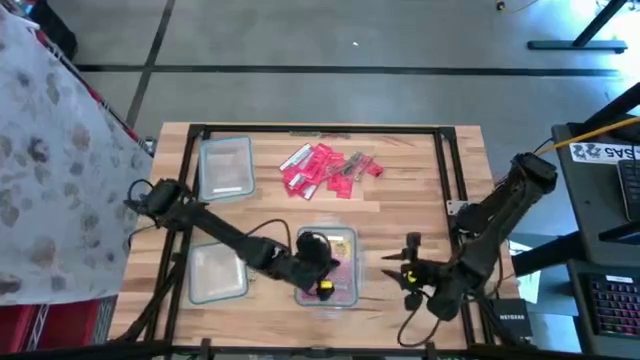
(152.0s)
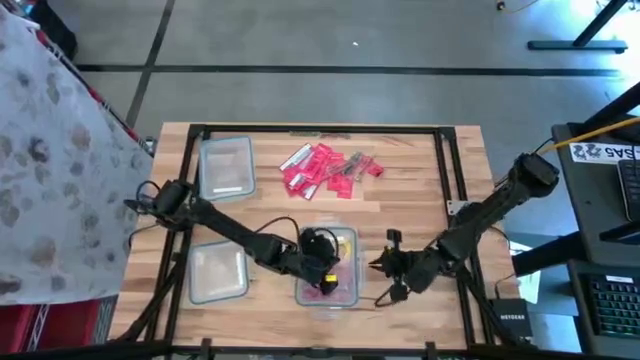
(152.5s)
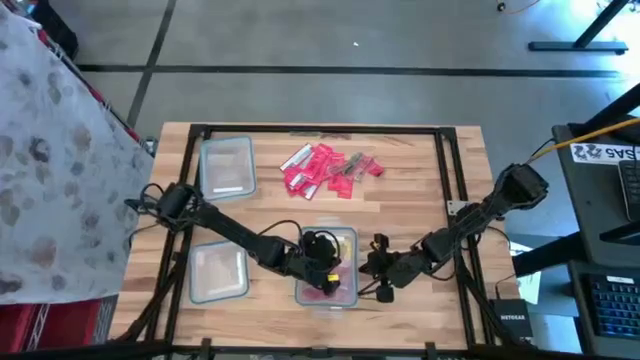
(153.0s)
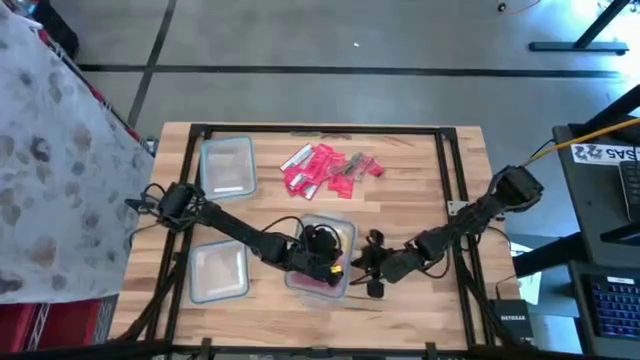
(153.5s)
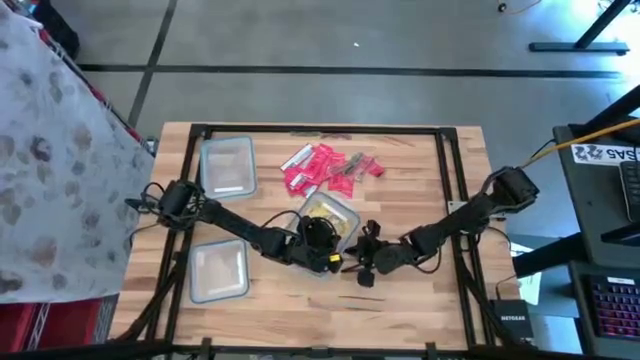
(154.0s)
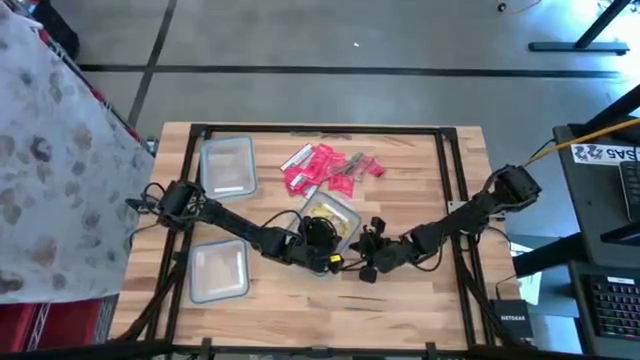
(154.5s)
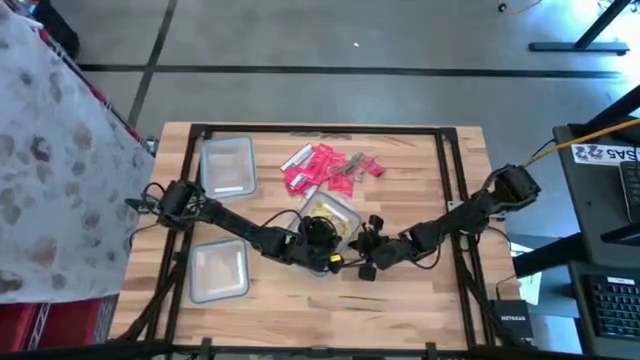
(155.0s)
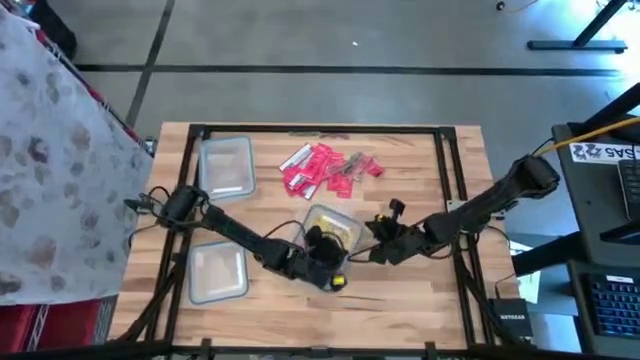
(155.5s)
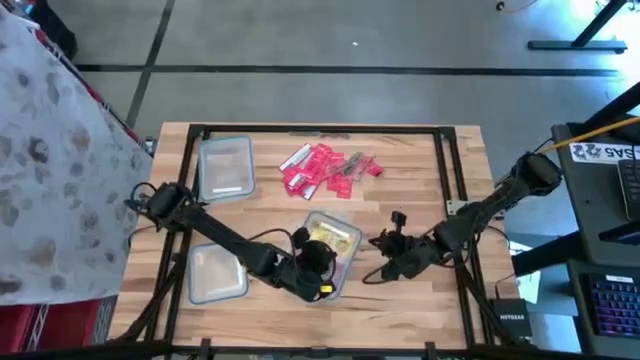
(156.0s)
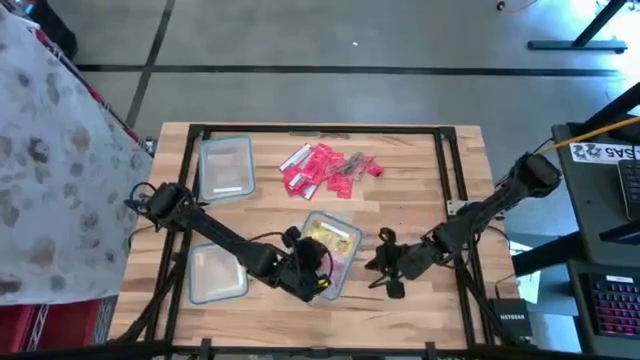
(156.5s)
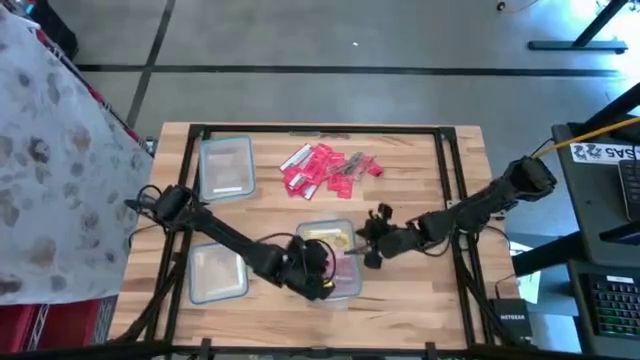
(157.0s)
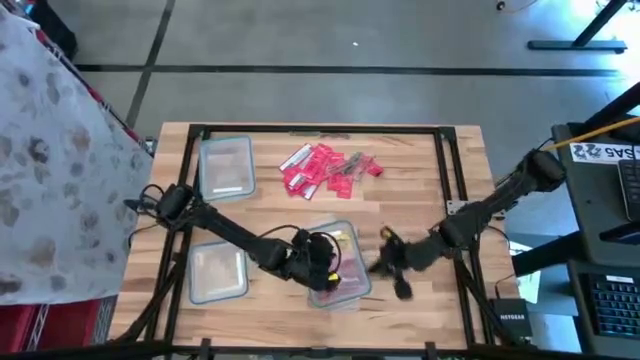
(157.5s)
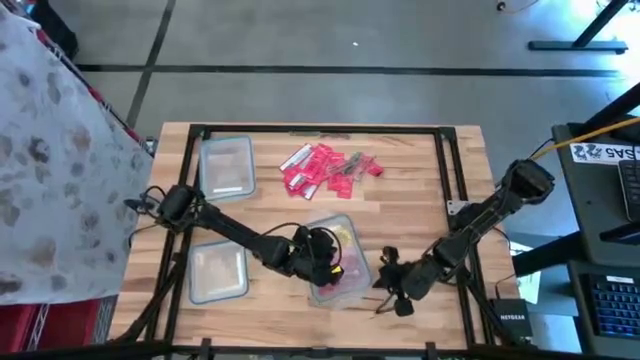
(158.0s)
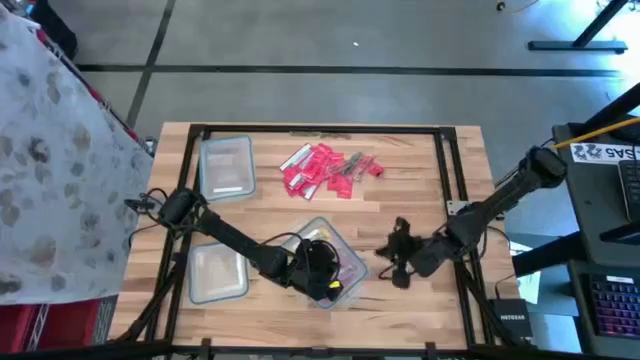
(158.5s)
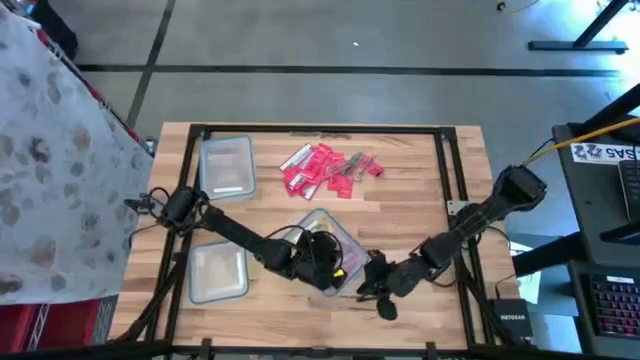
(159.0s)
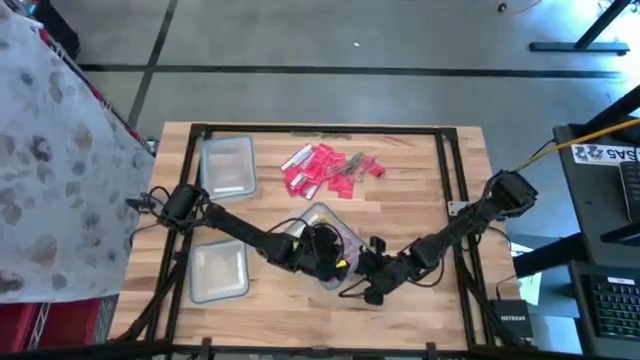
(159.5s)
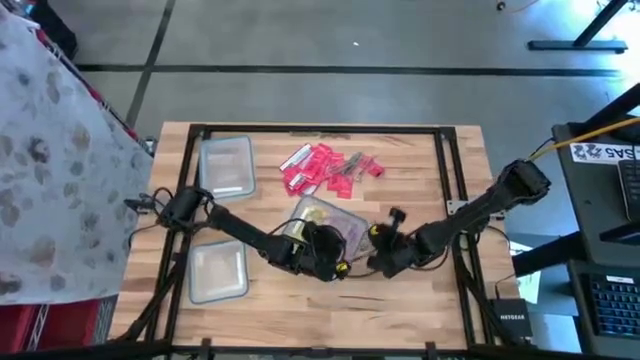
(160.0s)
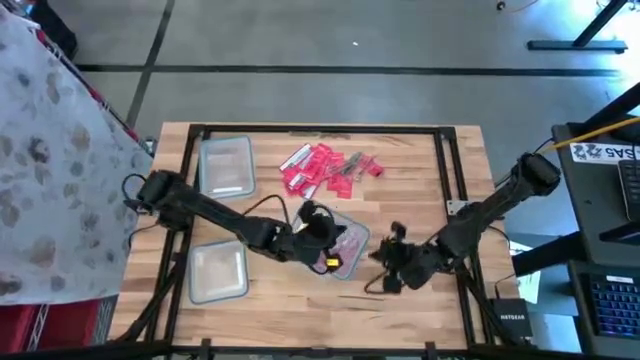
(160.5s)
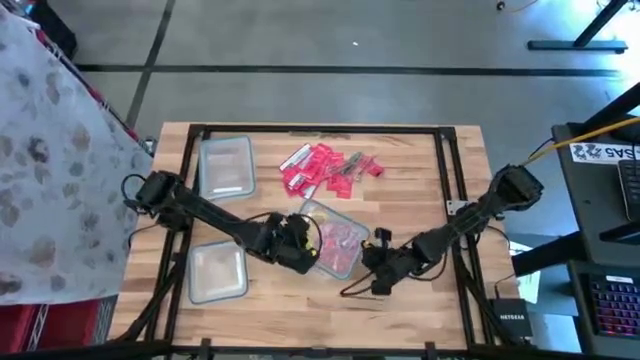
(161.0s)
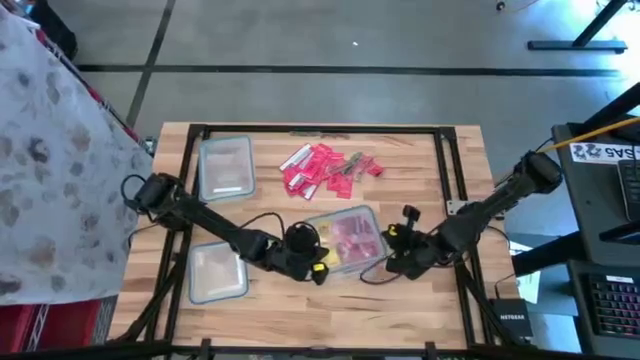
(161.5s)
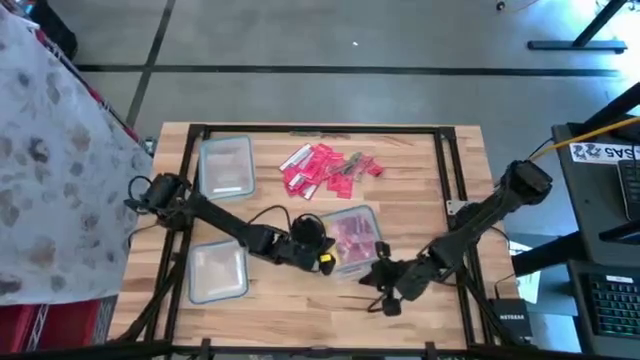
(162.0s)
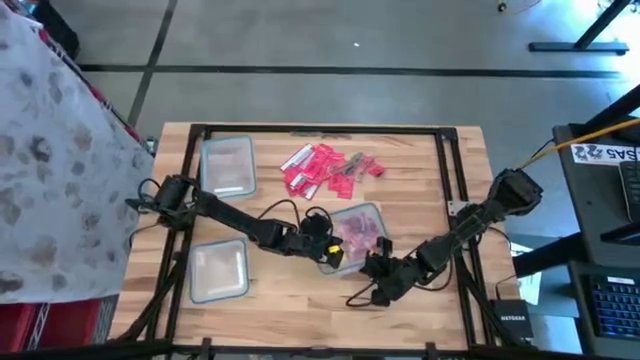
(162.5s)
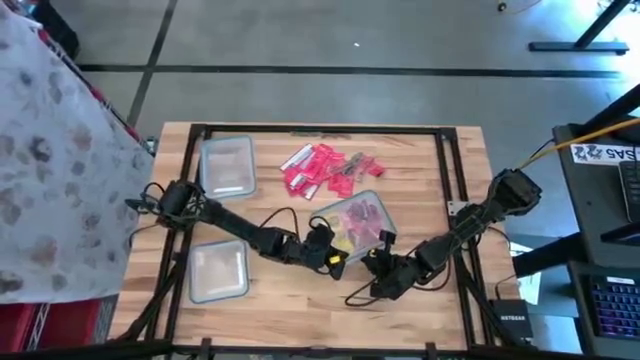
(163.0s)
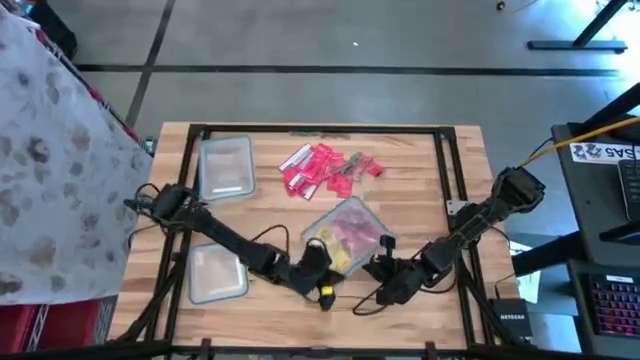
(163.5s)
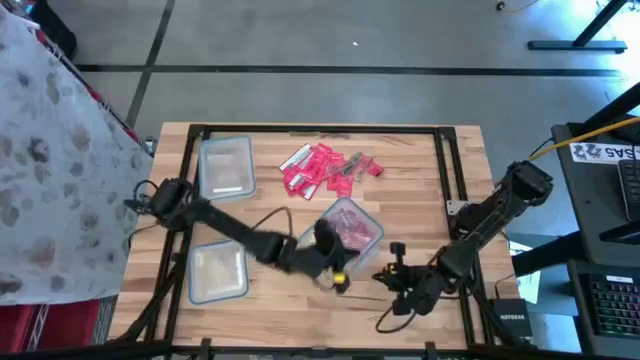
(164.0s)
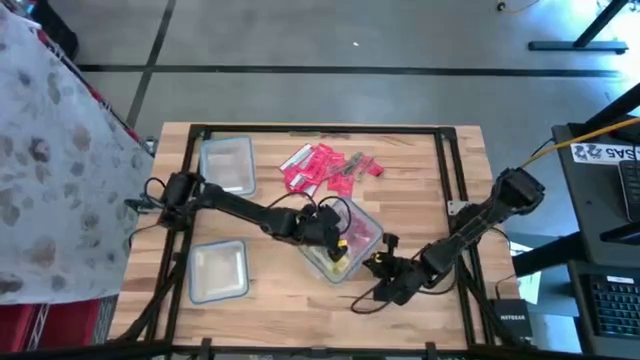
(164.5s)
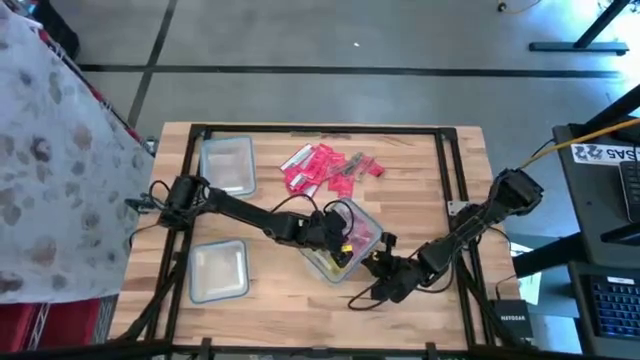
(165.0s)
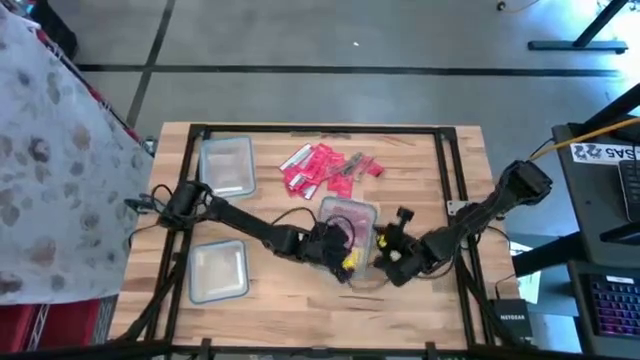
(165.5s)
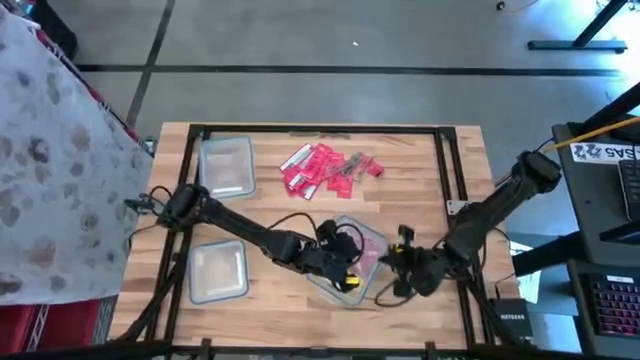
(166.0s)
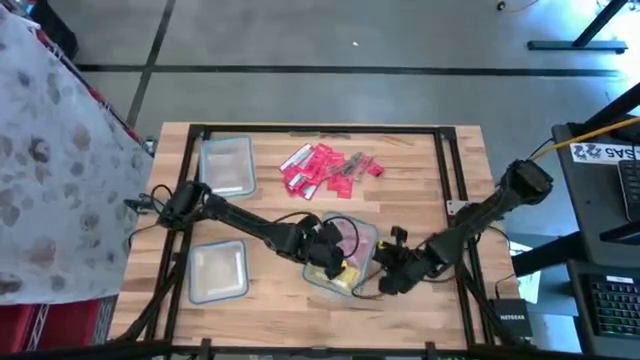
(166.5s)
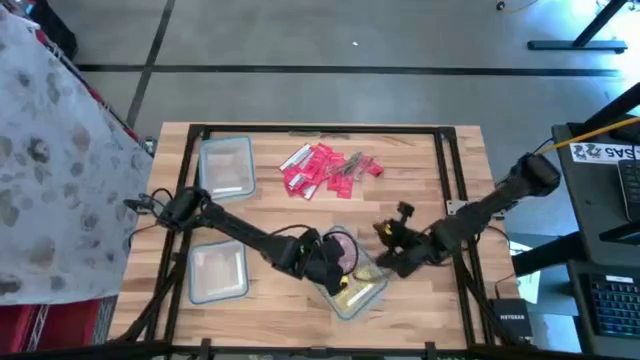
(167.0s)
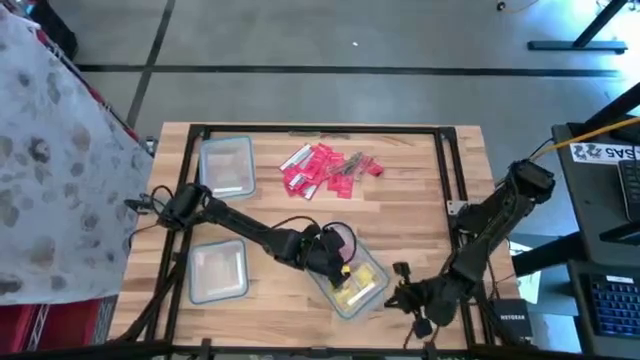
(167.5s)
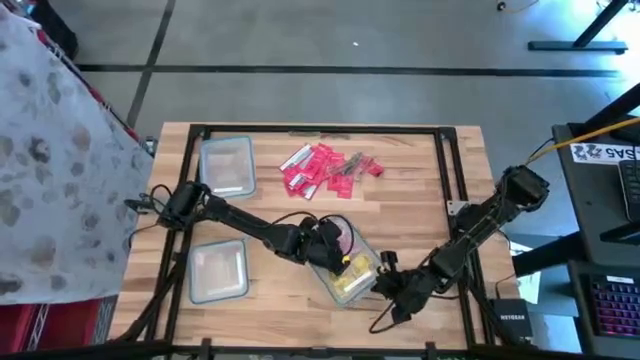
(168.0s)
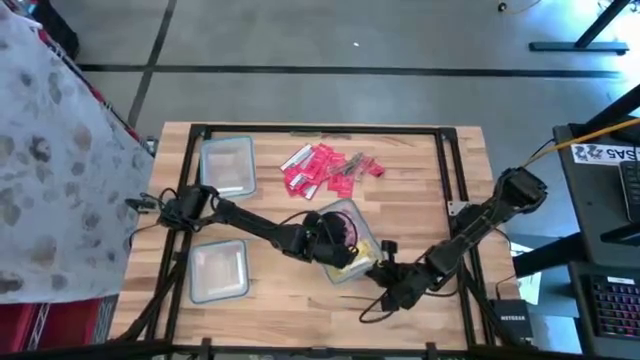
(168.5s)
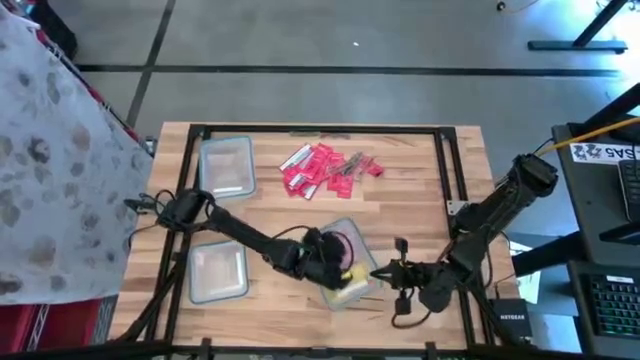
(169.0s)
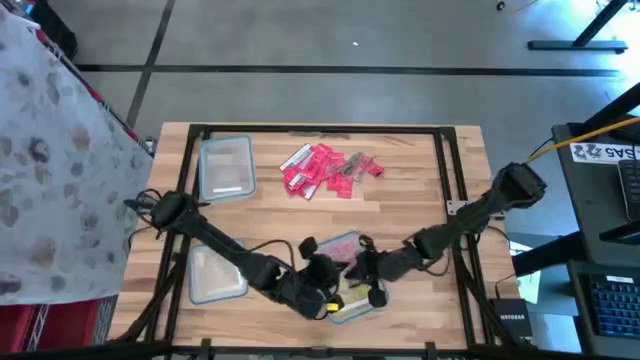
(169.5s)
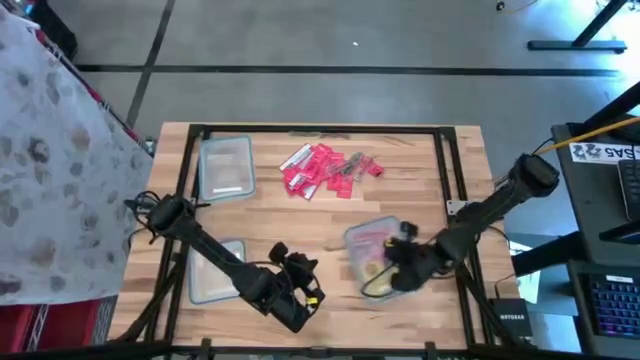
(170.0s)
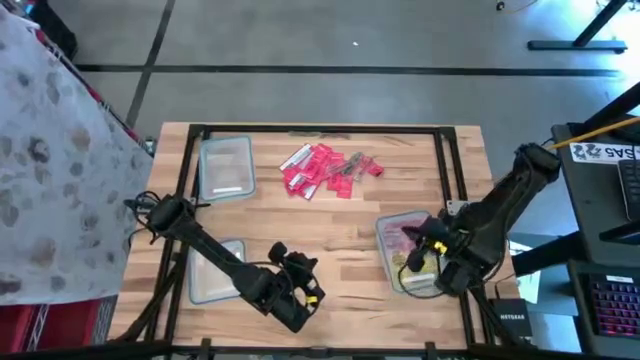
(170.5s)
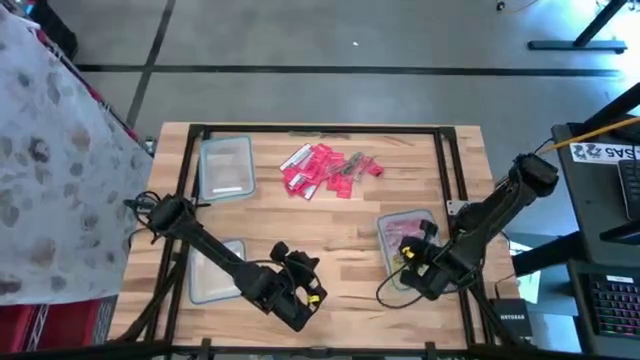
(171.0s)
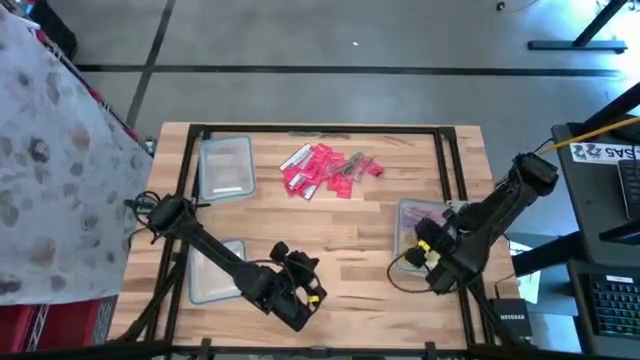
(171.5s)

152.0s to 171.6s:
Task: Sort candy
Close the right transparent bin

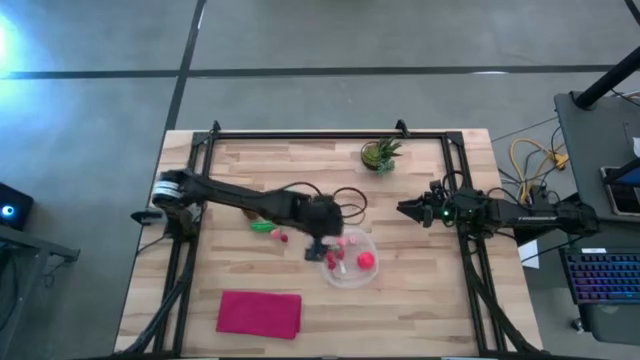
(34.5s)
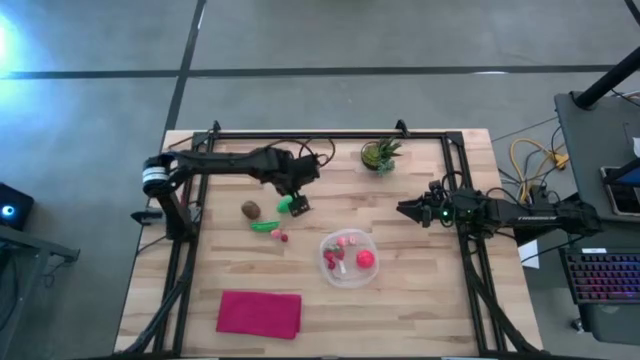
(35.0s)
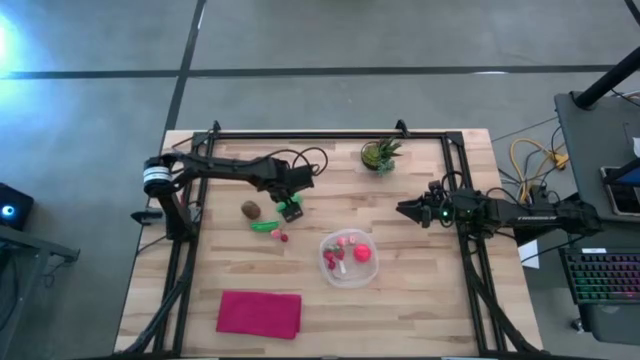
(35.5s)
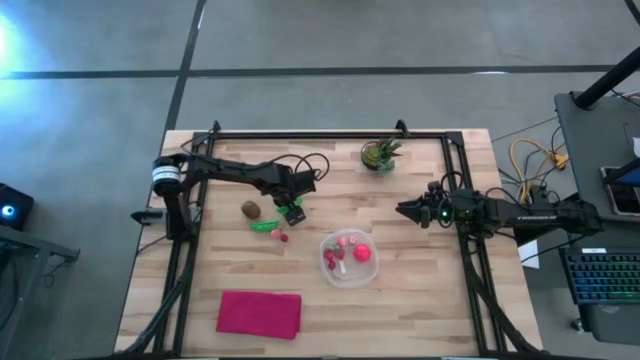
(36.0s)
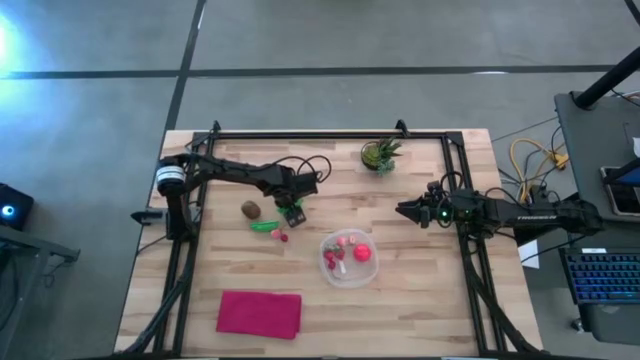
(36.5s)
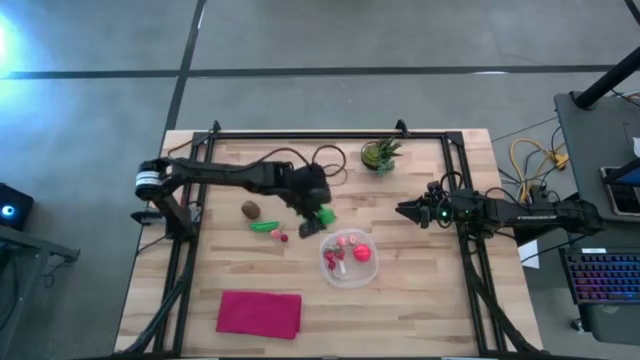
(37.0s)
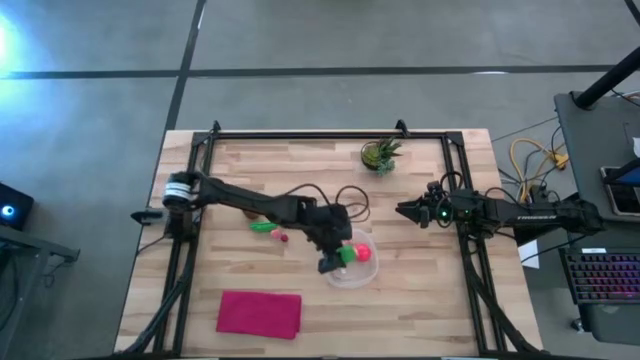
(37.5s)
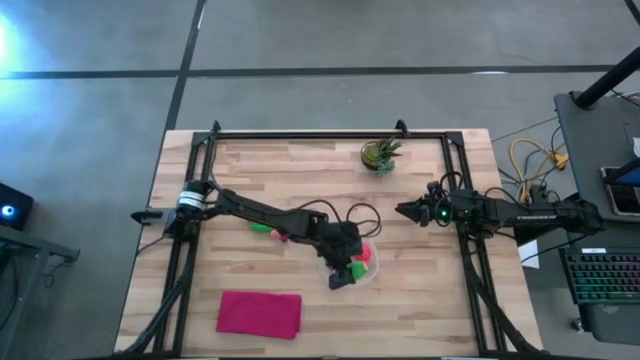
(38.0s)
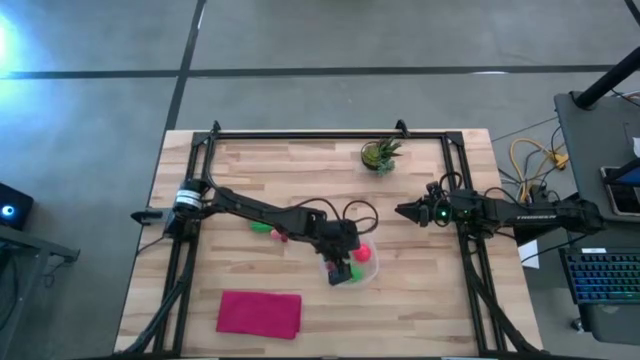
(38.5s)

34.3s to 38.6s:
Task: Pick and placing Produce into tupperware
Put the corn into the container
